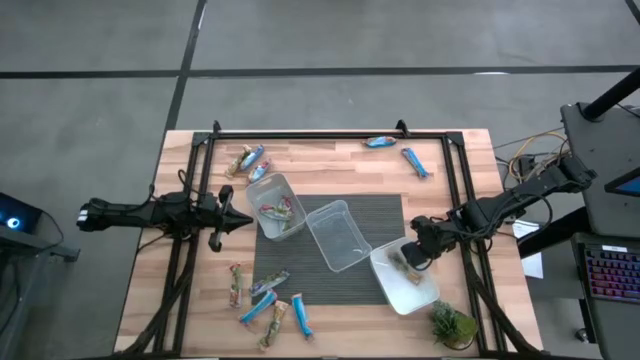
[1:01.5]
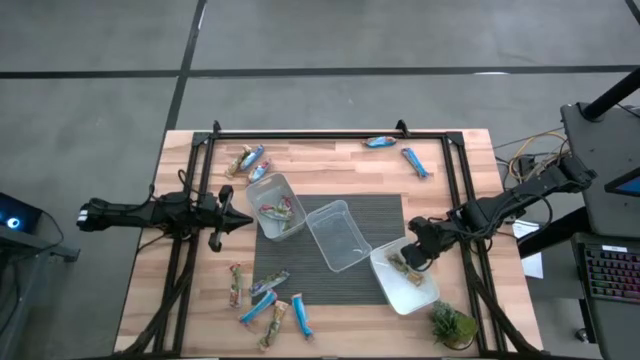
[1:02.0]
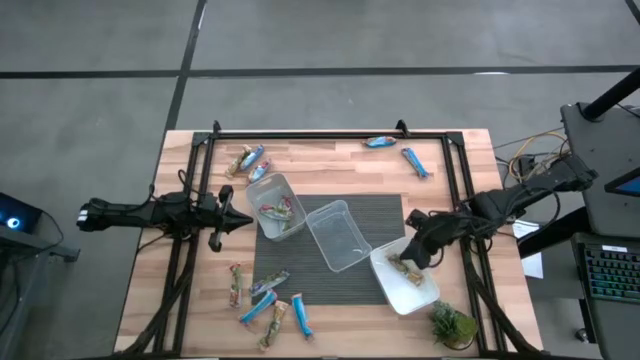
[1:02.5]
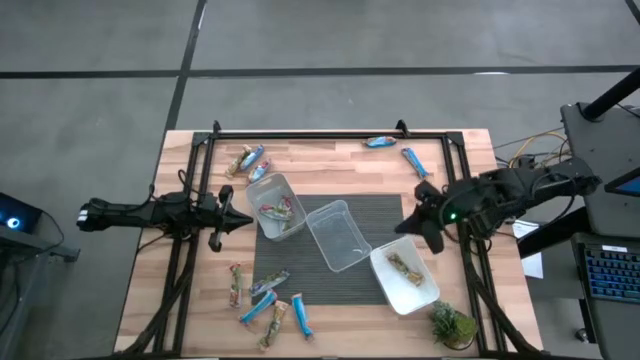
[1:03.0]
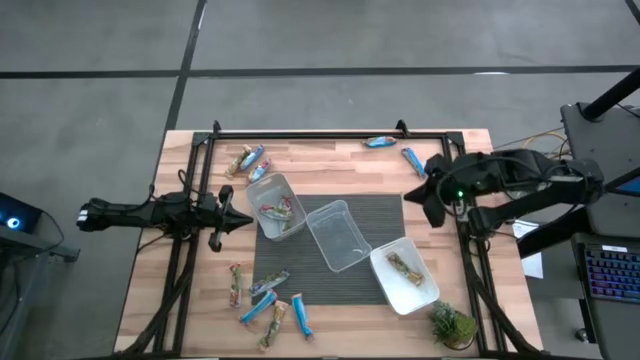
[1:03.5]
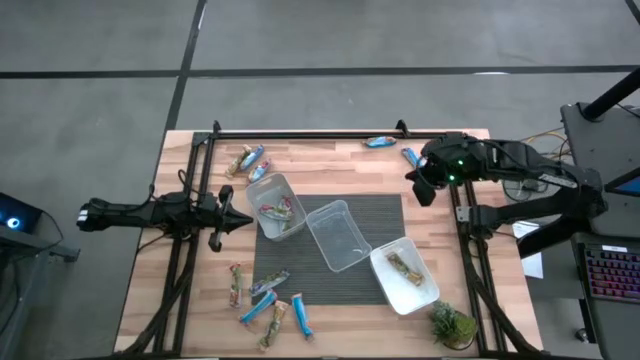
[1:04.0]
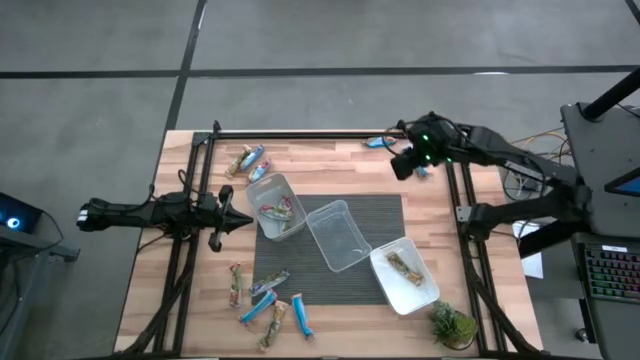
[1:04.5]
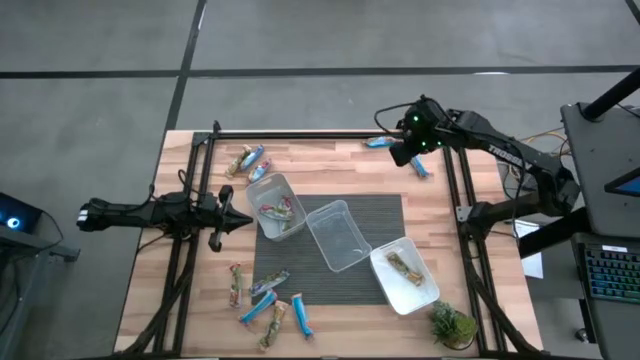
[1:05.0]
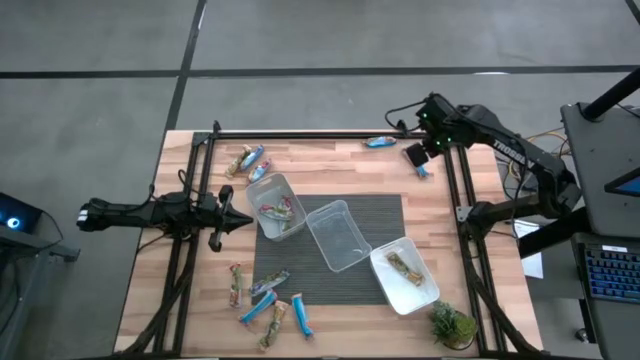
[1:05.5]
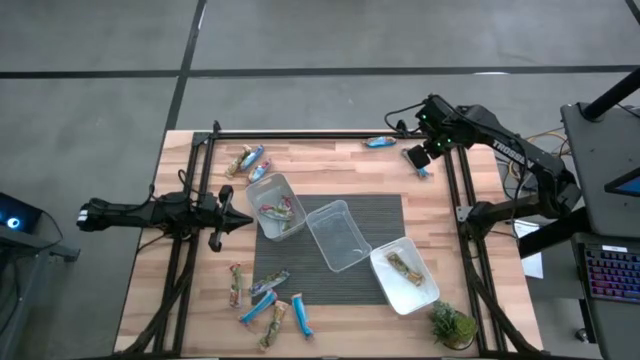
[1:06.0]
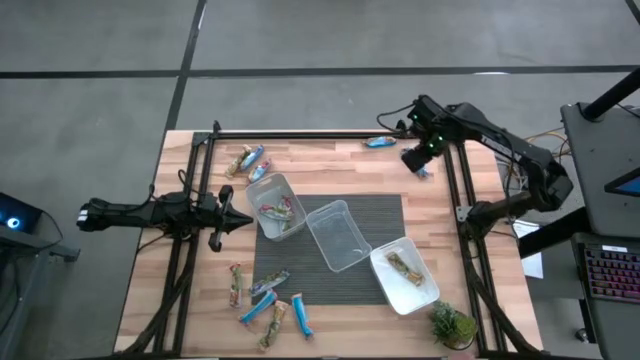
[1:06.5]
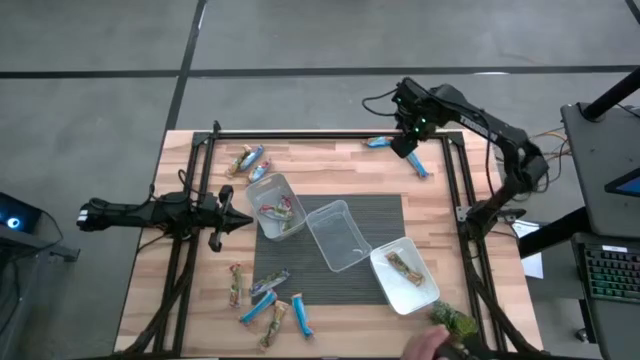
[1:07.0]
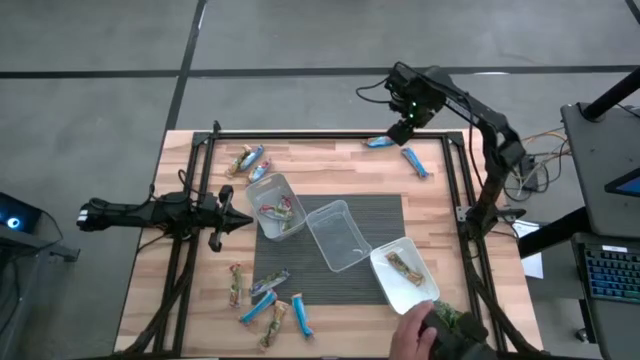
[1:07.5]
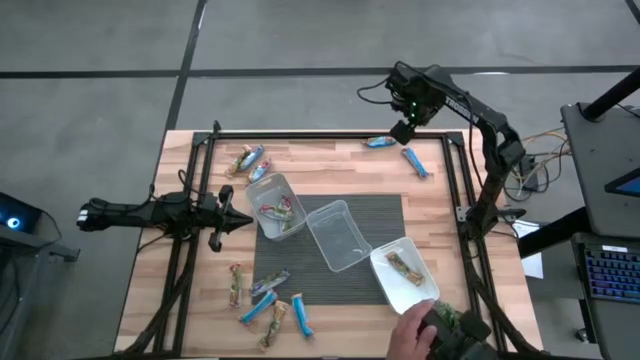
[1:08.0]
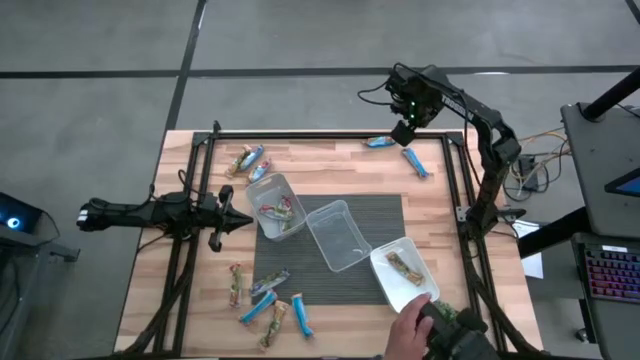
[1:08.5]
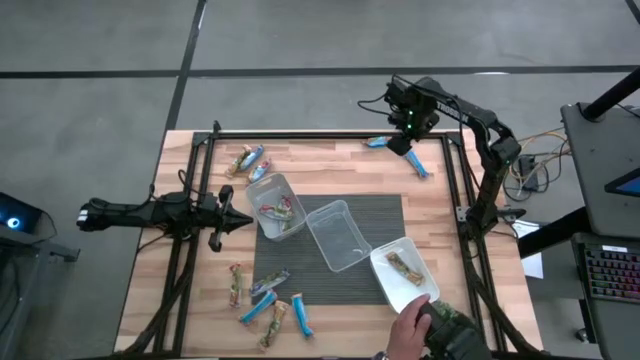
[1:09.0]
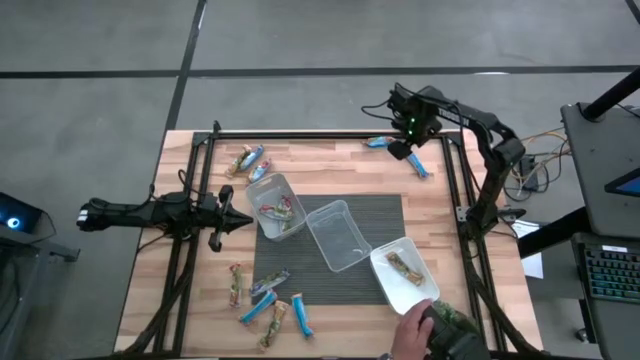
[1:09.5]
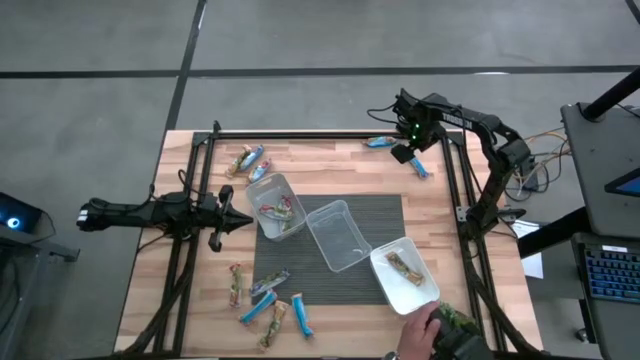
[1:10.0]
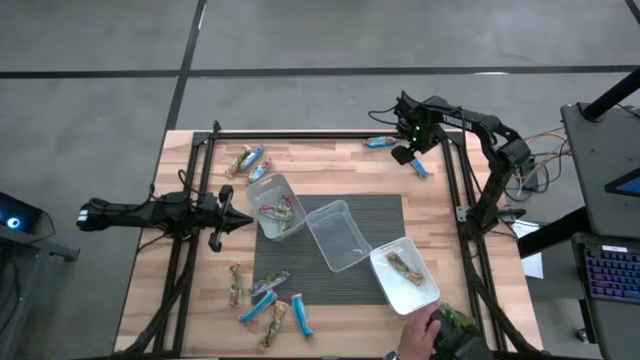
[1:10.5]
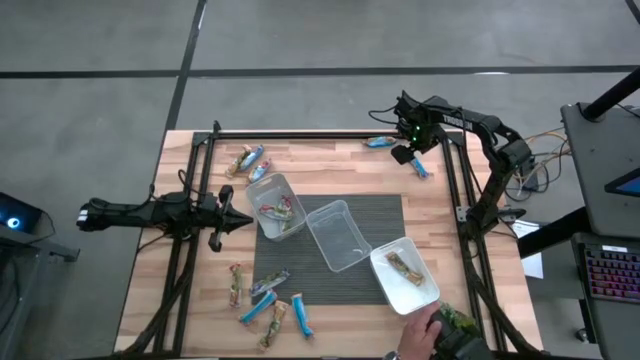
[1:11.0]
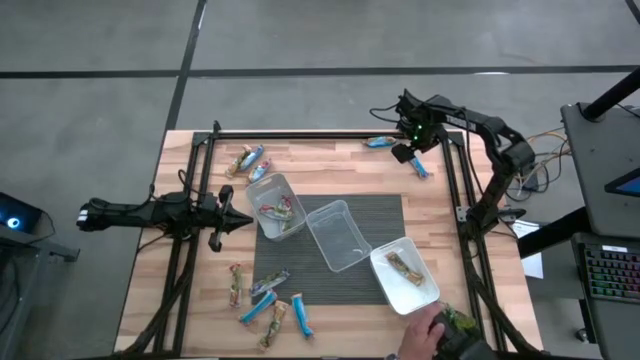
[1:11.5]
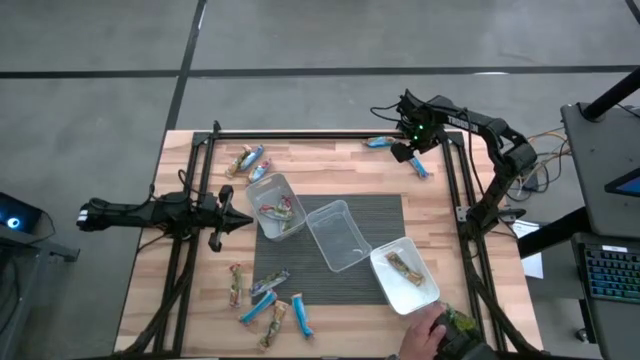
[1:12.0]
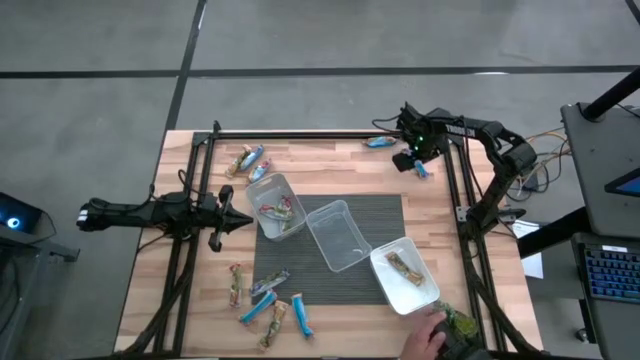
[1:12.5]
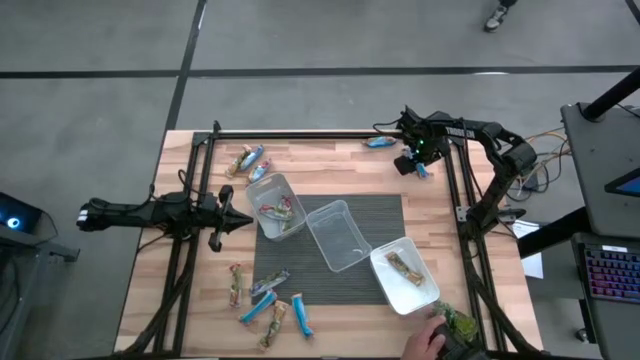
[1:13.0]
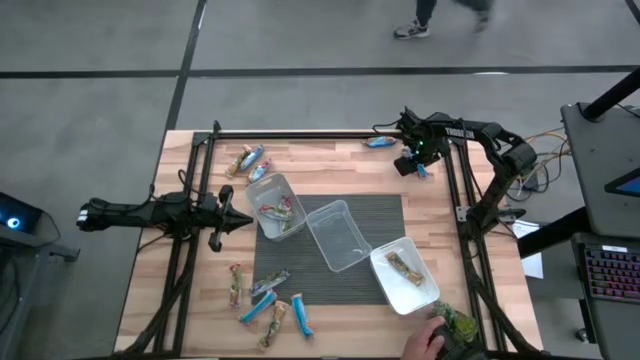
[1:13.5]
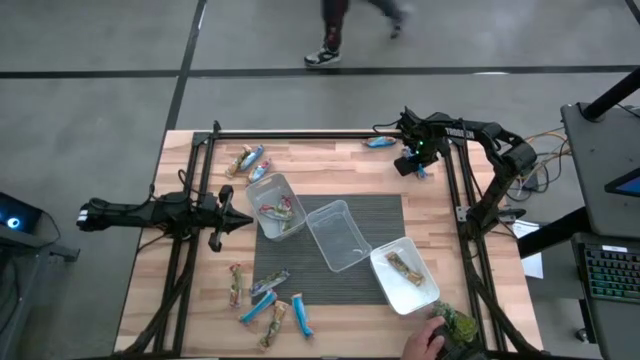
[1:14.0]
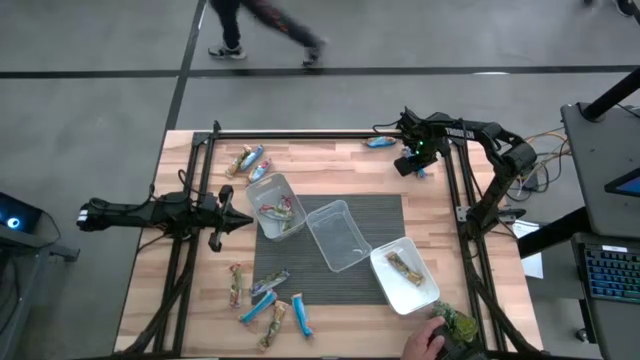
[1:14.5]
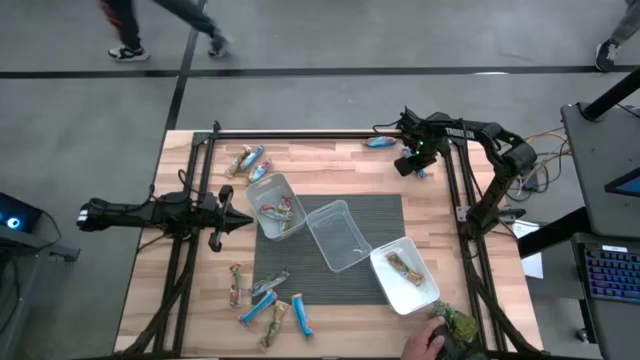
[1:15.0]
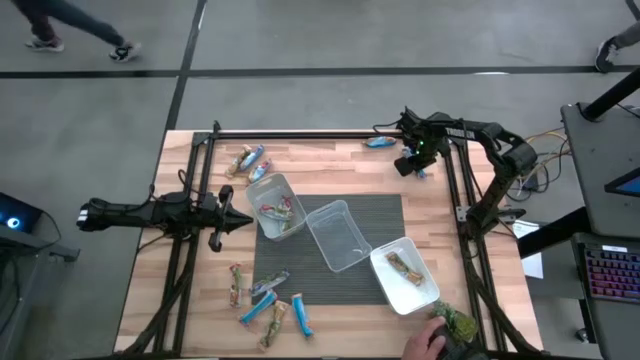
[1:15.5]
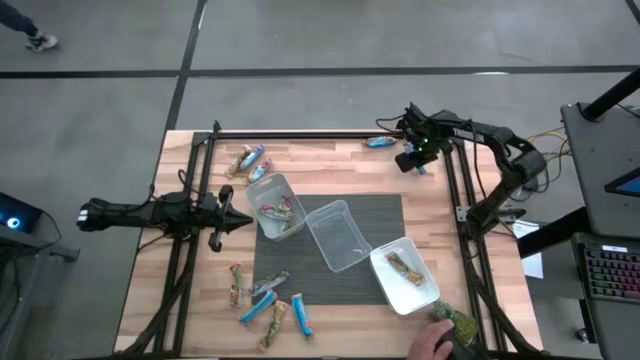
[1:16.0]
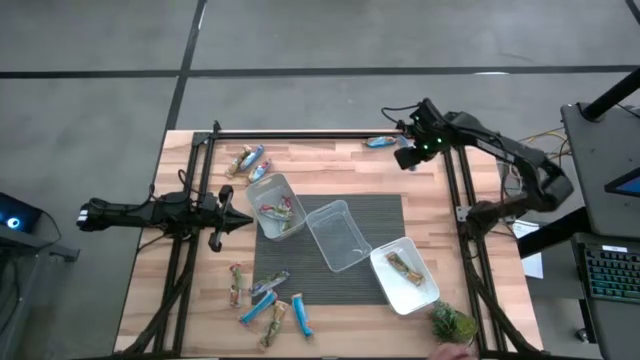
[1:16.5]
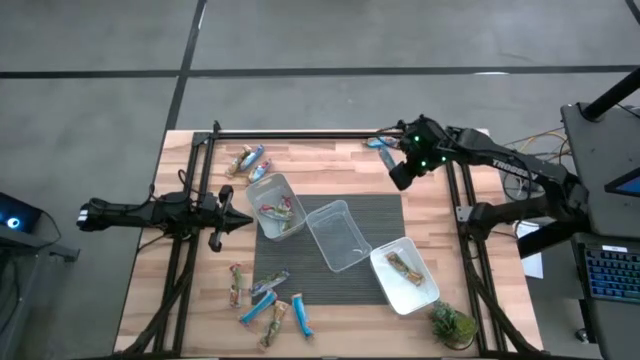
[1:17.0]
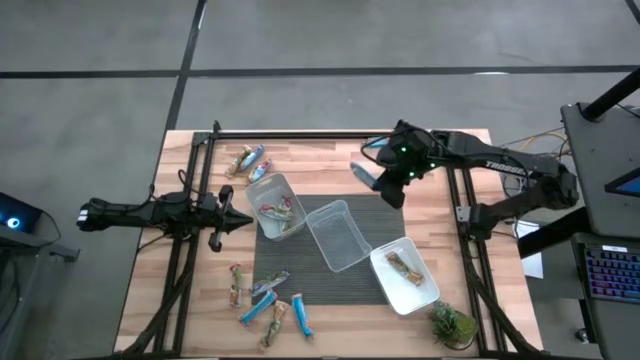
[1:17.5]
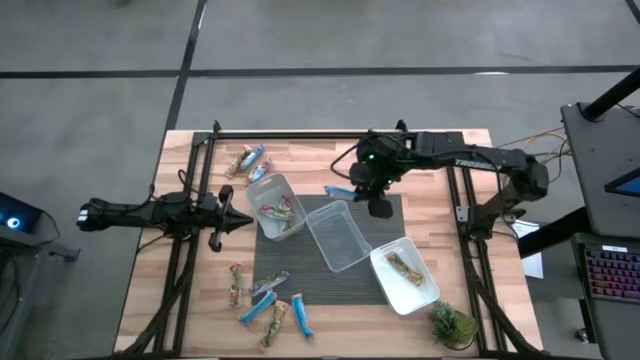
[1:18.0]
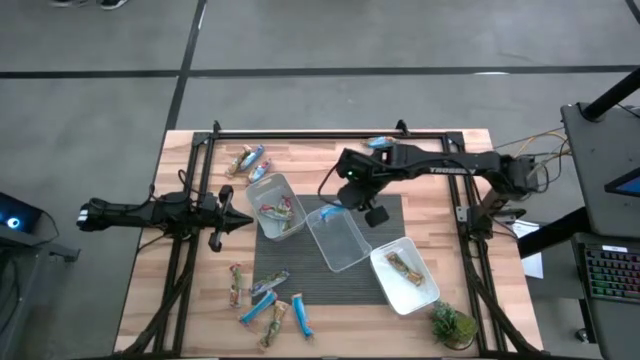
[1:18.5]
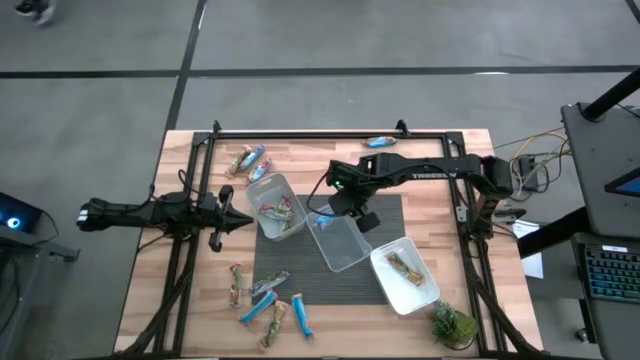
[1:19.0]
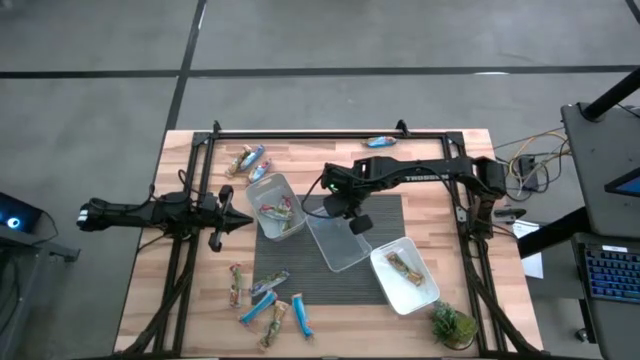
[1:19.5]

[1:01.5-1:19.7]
Task: Pick and place Granola Bars by type
Put the blue granola bar into the transparent bin

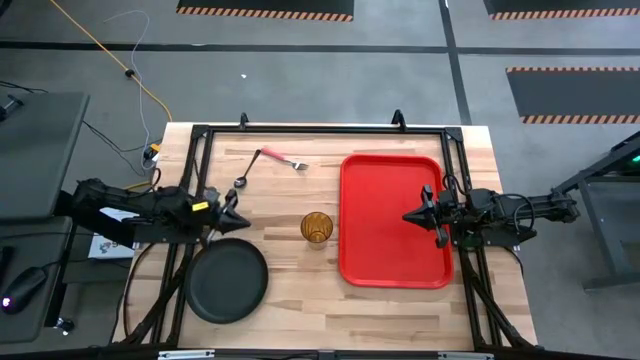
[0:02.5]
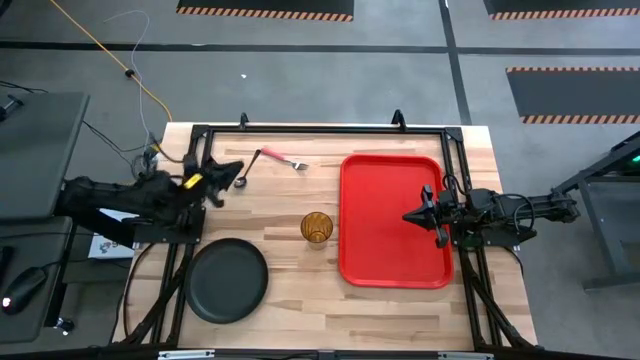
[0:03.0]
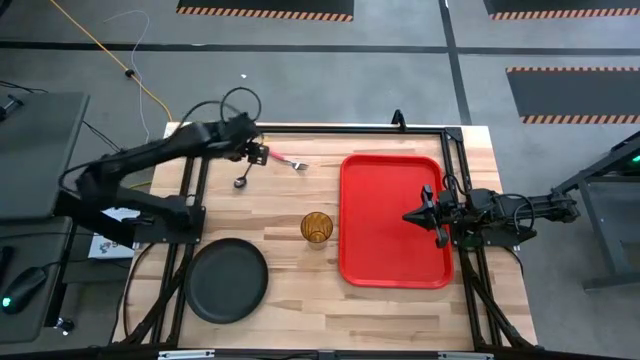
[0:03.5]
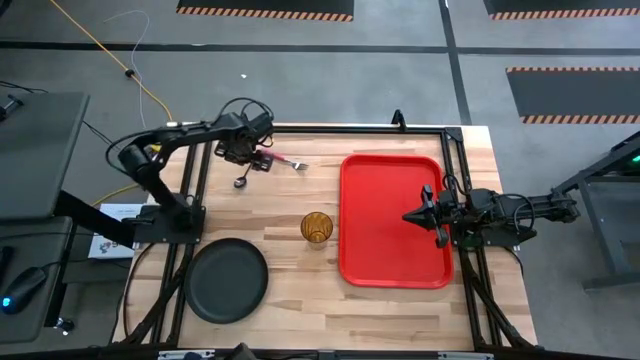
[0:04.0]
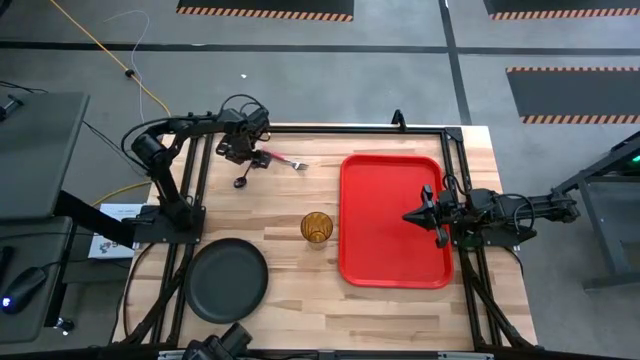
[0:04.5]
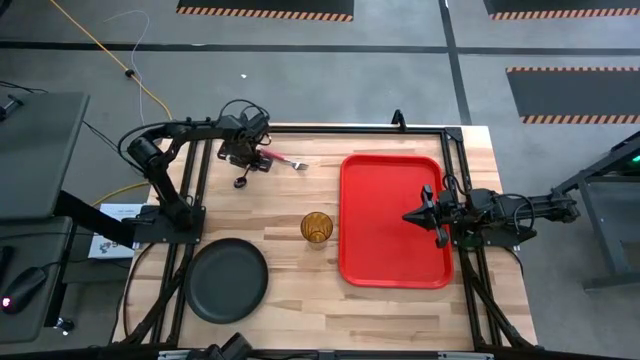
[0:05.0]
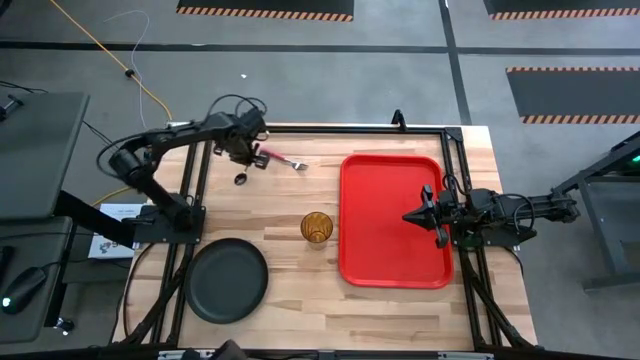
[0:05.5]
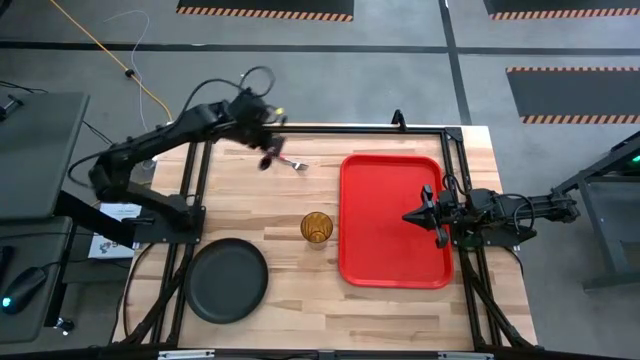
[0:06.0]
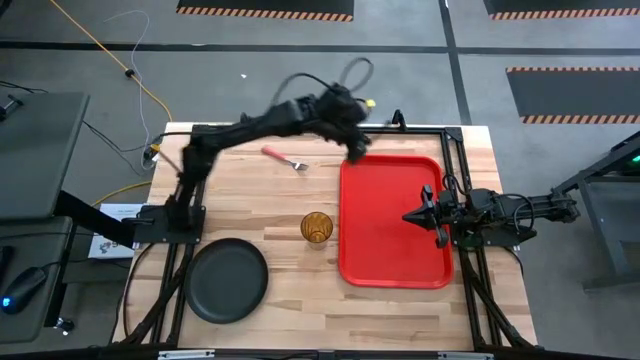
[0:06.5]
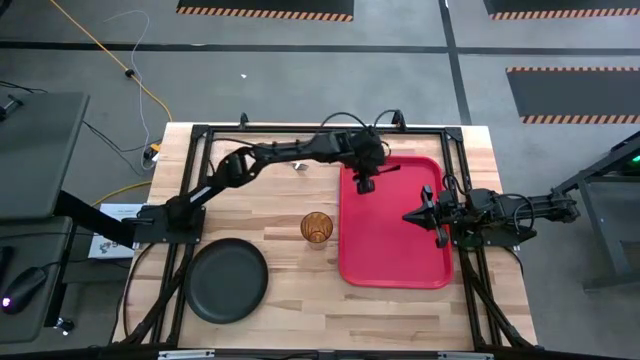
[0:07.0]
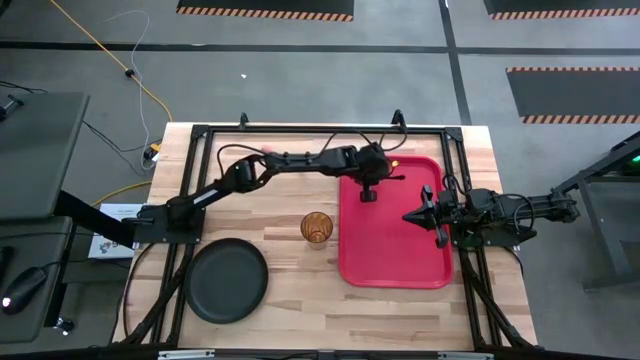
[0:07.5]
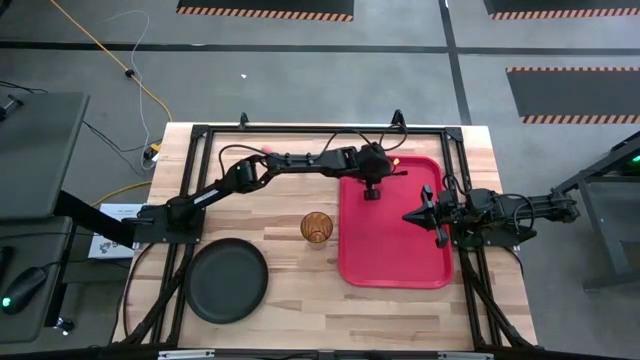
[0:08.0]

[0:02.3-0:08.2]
Task: Pick and place plate/cup/fork/spoon on tray
Put the black spoon on the red serving tray
